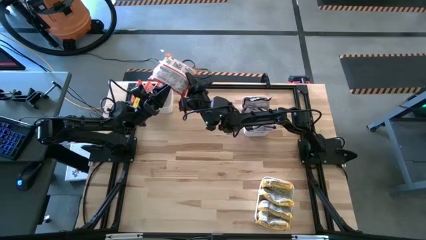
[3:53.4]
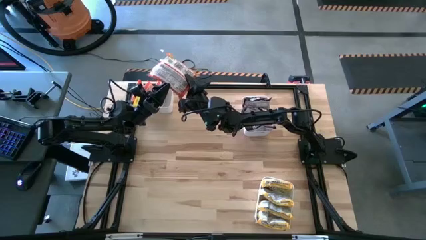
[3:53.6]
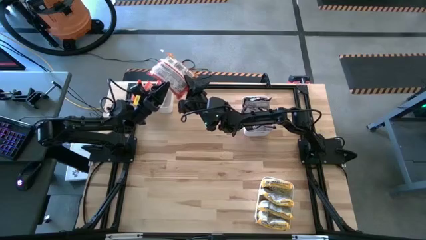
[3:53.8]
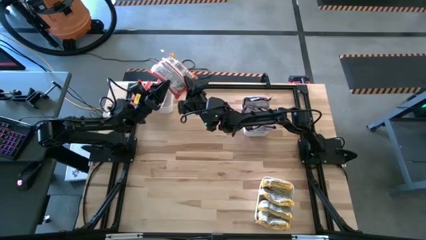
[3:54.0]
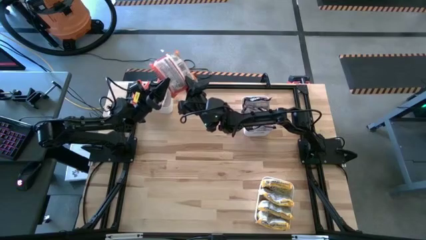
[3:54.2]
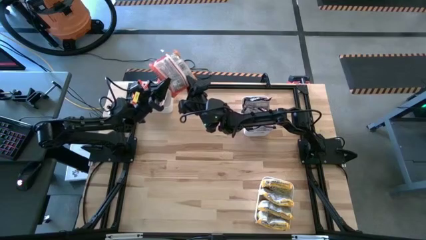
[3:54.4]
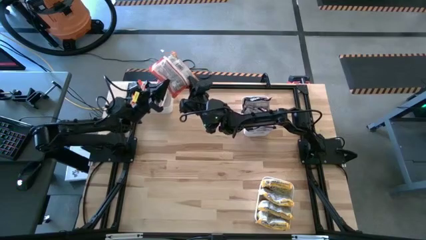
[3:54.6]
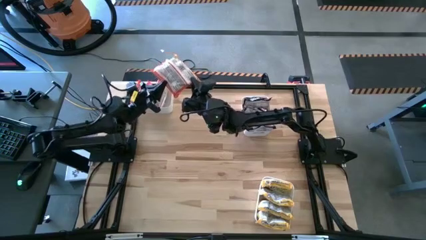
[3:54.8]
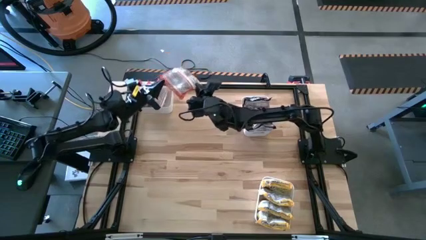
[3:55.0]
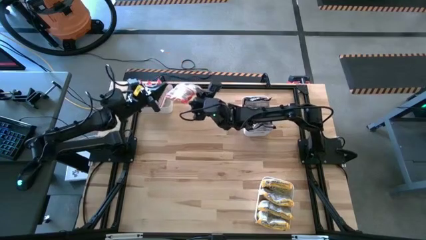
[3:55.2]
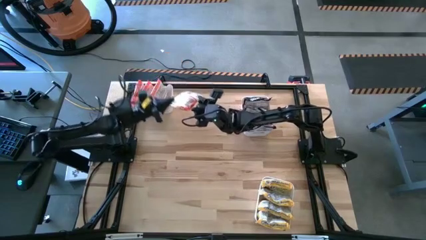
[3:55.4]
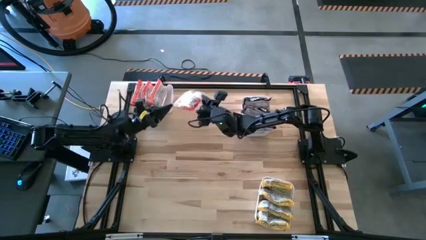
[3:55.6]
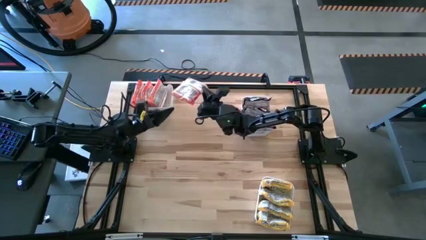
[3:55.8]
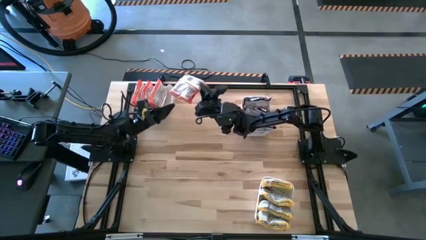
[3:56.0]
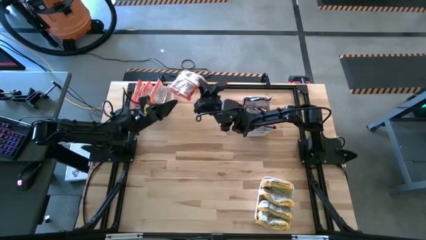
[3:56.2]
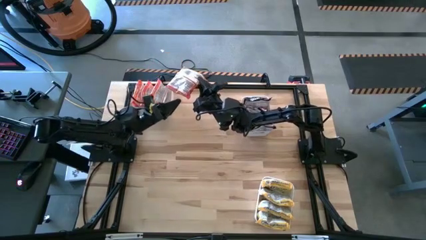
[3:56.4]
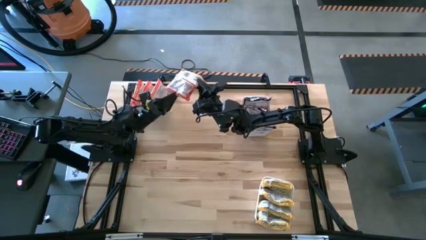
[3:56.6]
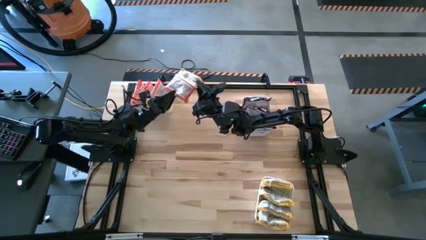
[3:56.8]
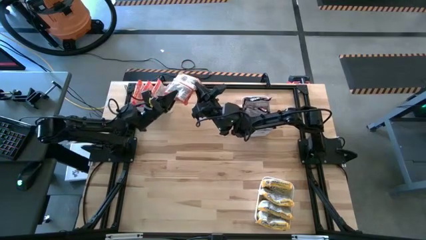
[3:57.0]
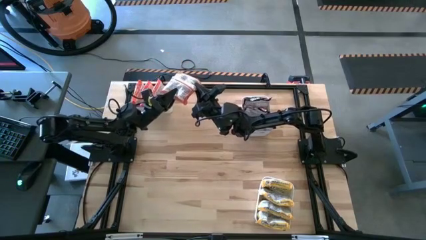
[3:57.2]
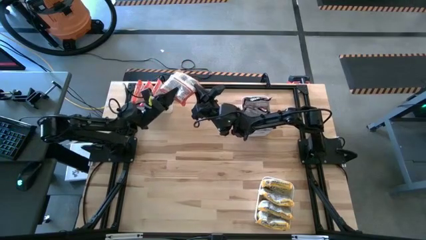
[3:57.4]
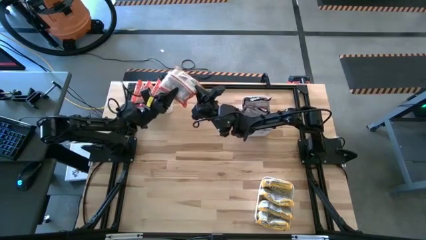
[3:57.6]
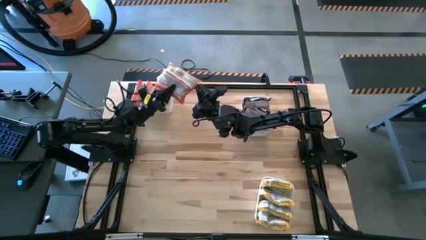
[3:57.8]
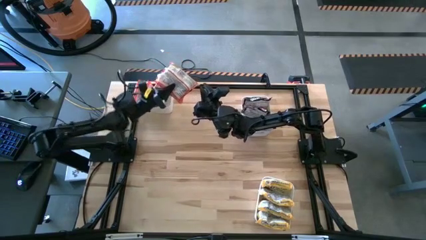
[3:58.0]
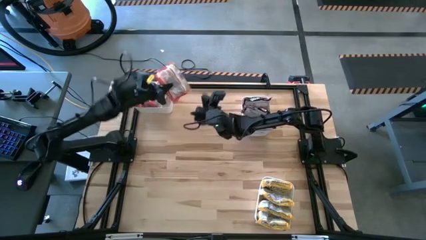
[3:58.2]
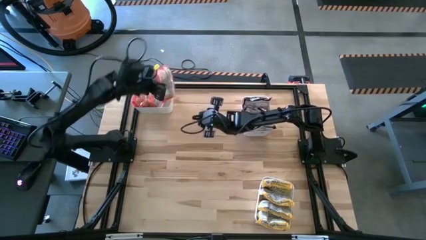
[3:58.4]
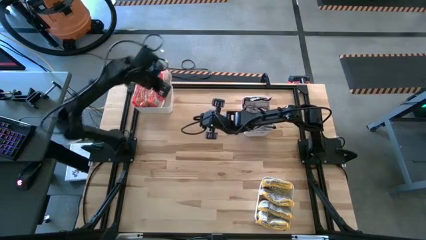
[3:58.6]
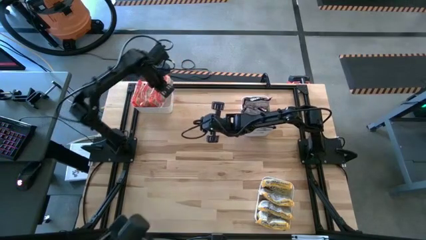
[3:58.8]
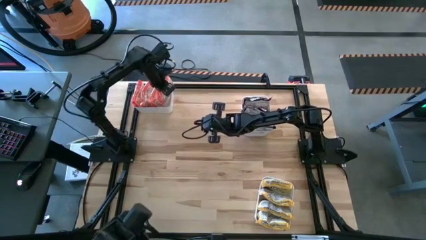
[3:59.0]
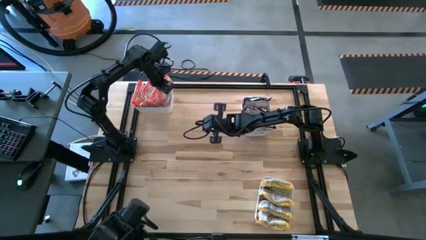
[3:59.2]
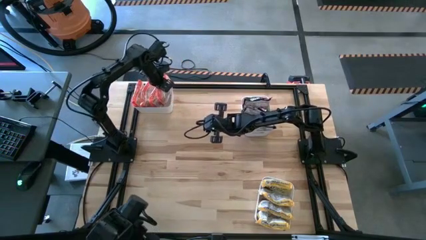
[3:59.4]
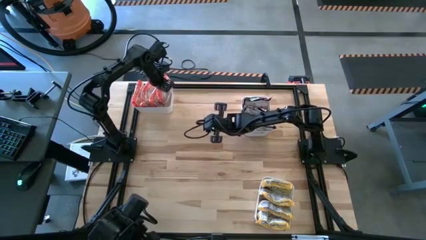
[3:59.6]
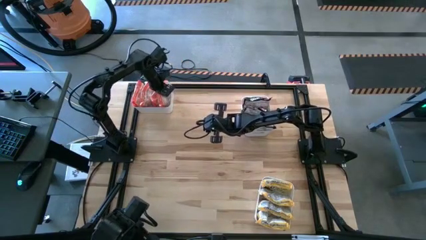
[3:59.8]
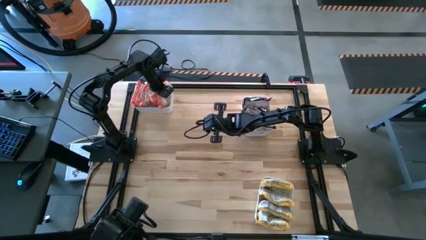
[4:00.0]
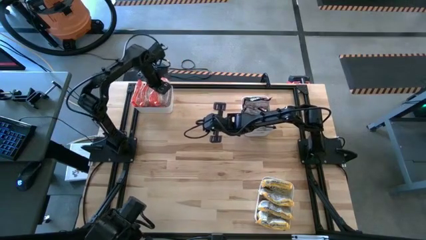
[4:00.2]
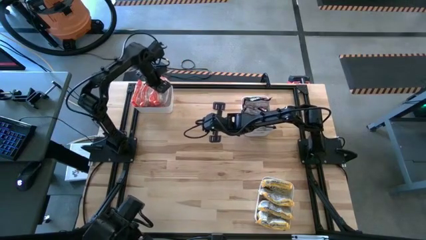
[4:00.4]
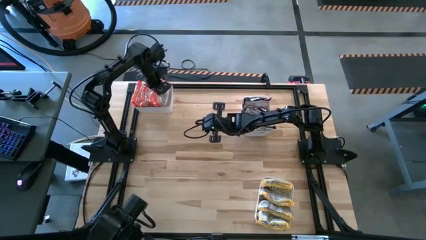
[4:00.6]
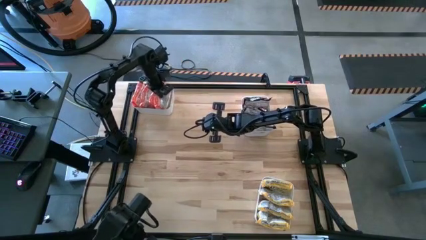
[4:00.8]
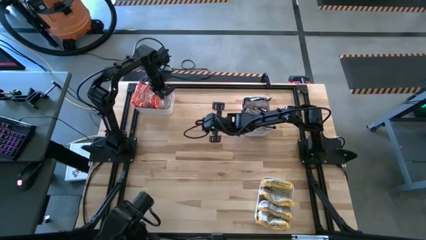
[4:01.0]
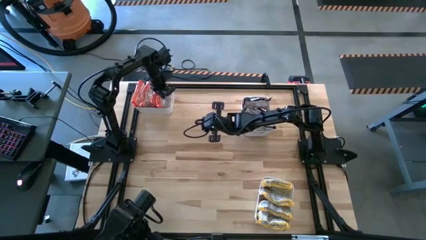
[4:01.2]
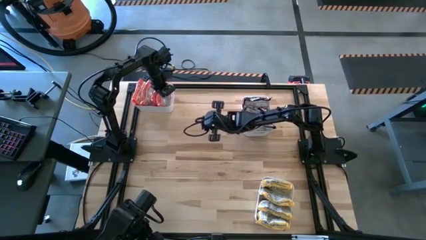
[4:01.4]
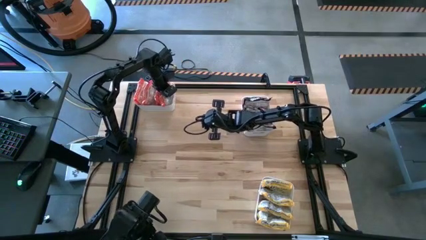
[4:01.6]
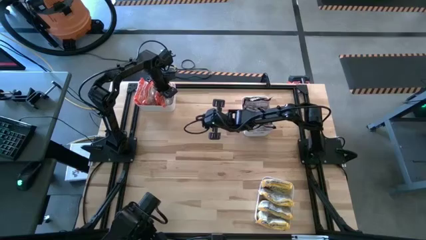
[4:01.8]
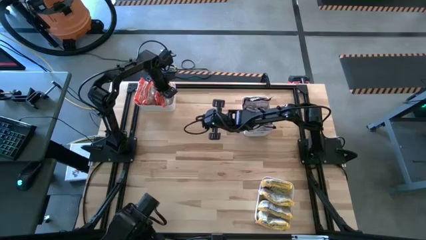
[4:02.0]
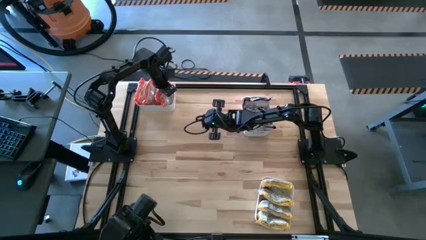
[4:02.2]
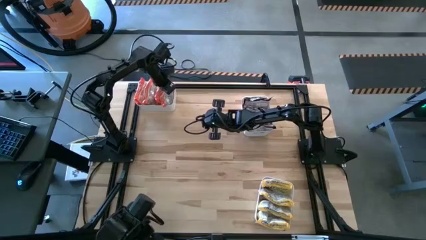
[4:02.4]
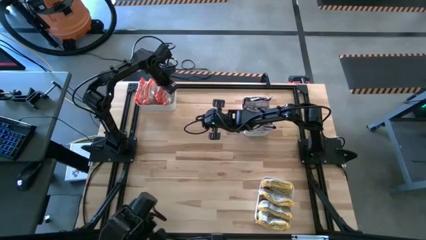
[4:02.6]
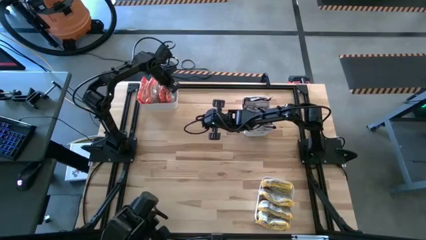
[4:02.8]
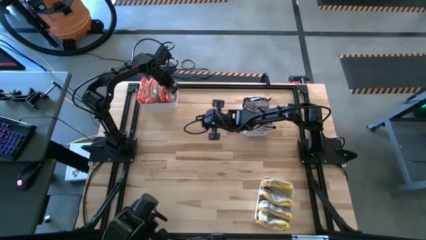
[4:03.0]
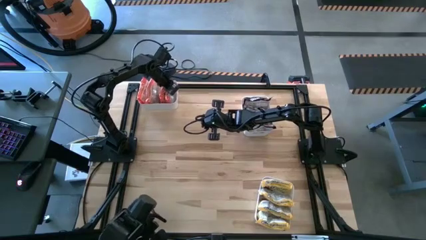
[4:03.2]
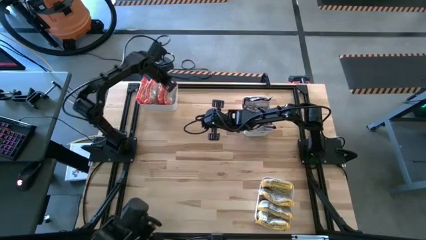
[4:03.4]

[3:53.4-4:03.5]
Task: Sort Maruchan noodles
Put the orange noodle pack into the top left white bin

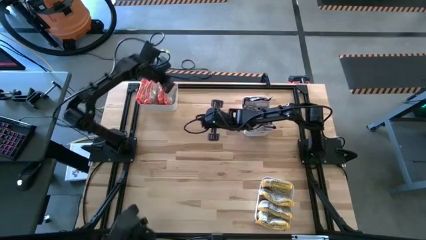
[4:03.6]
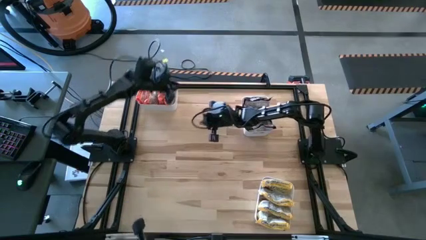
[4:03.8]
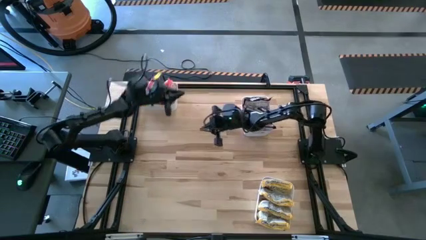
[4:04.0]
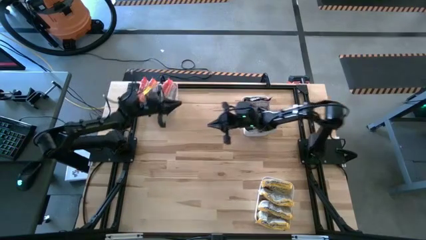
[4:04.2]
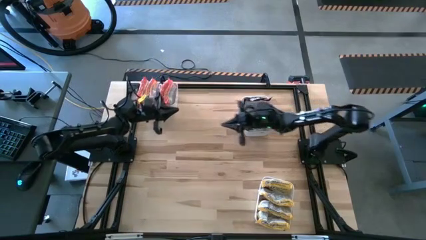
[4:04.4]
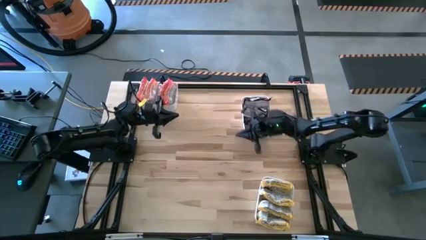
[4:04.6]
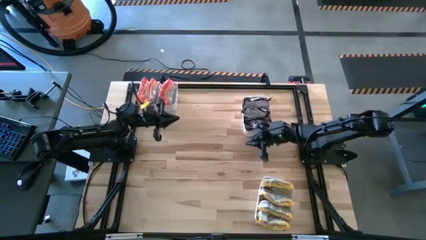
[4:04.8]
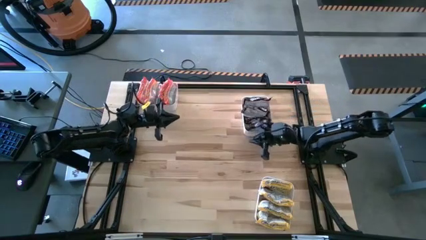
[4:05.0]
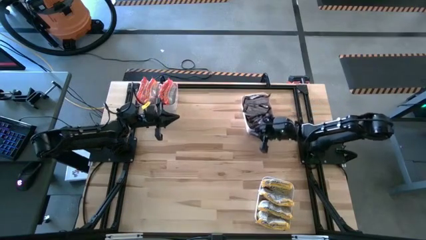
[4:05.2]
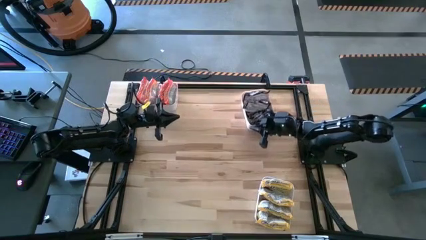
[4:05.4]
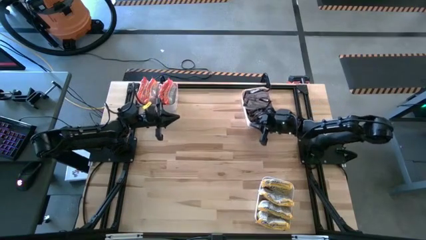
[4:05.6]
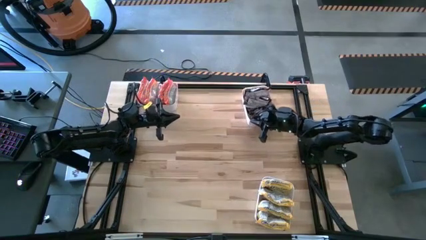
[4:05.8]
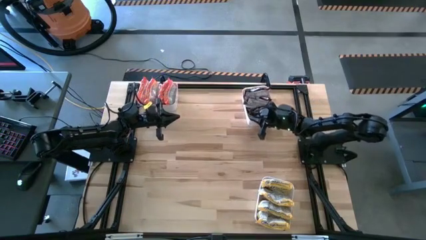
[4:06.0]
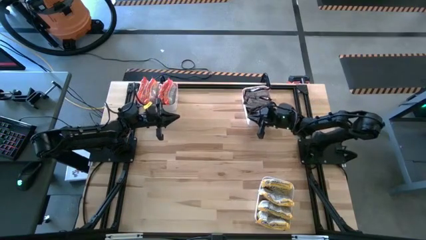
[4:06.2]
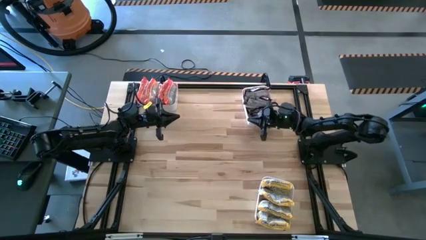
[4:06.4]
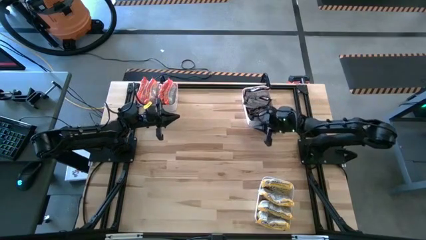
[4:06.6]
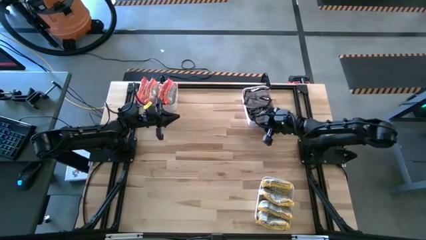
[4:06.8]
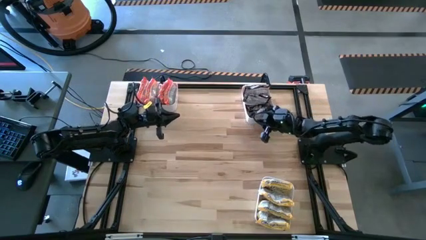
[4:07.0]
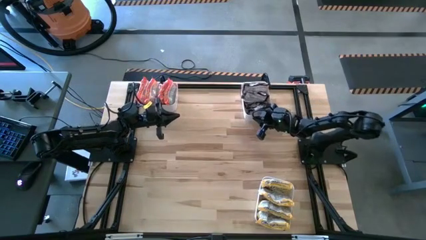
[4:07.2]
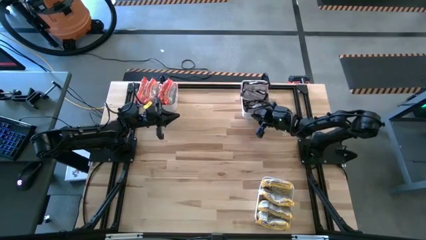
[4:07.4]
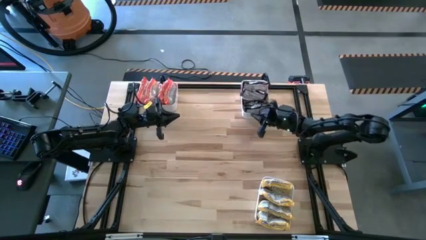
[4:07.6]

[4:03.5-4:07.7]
Adjust the top right white bin
